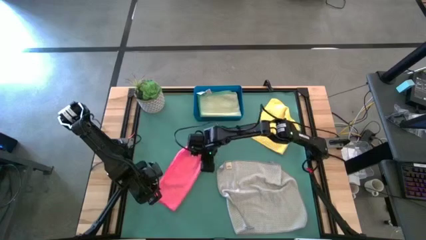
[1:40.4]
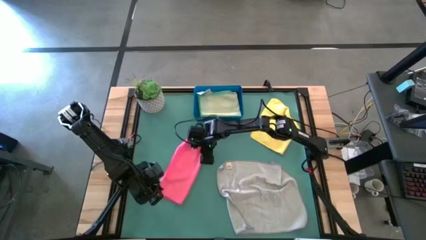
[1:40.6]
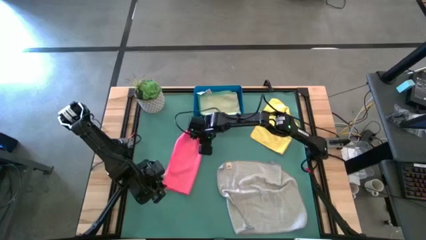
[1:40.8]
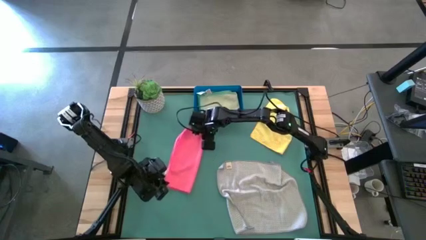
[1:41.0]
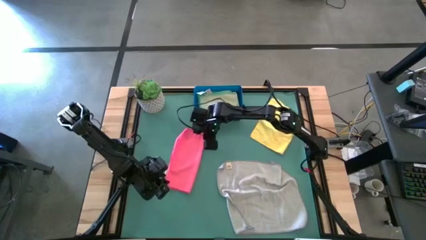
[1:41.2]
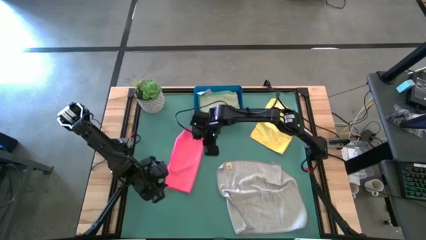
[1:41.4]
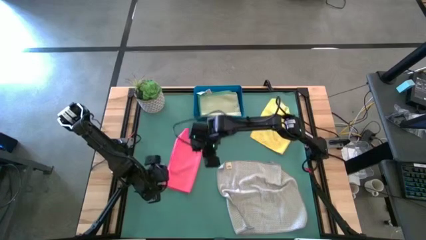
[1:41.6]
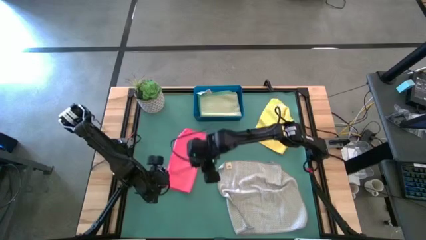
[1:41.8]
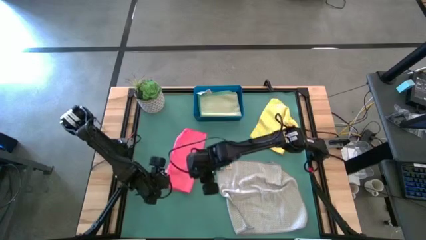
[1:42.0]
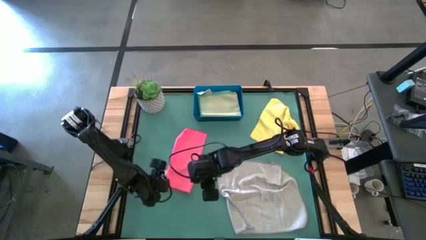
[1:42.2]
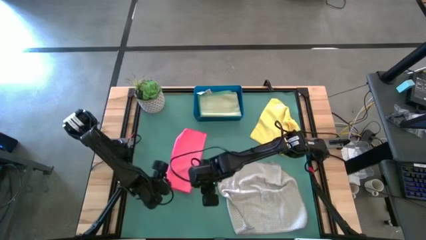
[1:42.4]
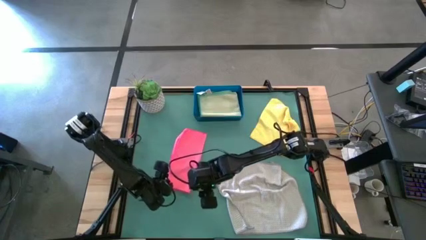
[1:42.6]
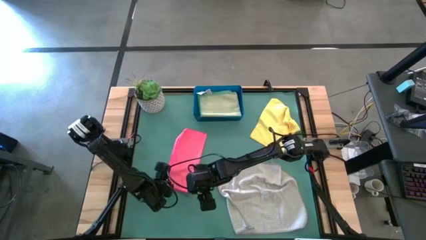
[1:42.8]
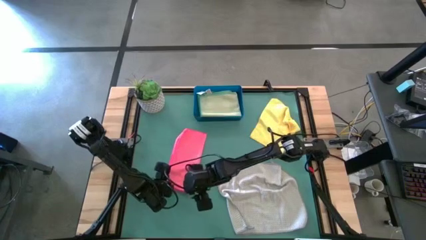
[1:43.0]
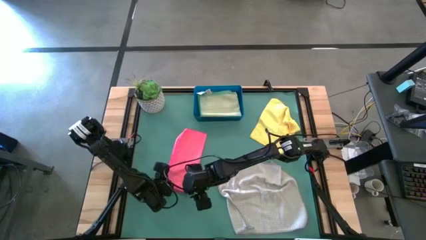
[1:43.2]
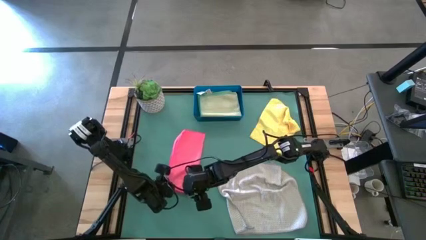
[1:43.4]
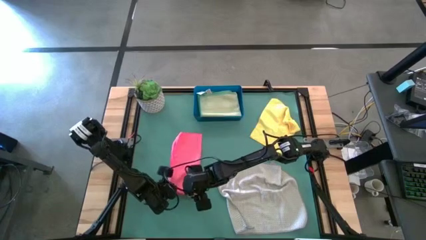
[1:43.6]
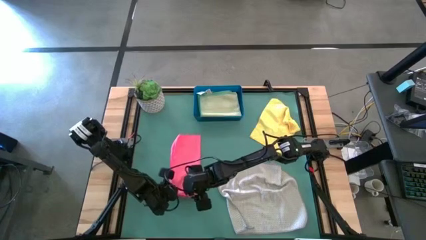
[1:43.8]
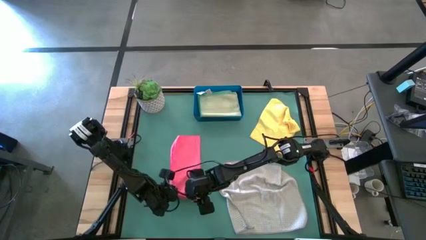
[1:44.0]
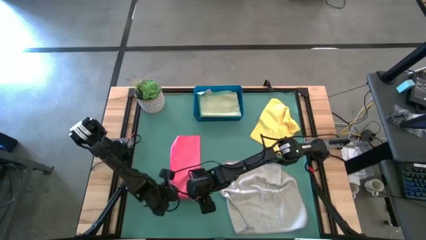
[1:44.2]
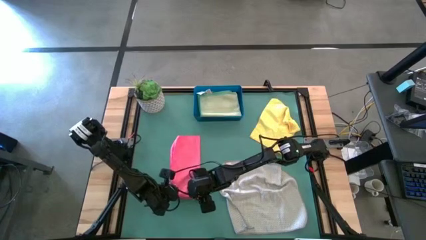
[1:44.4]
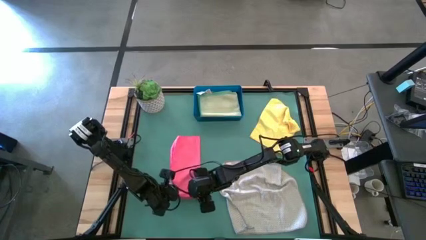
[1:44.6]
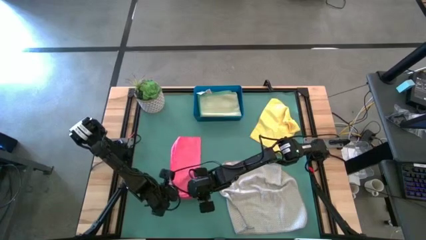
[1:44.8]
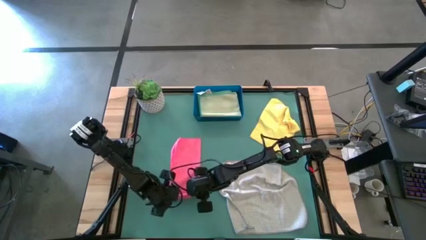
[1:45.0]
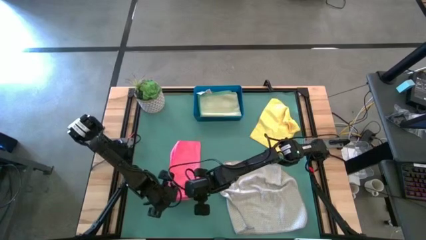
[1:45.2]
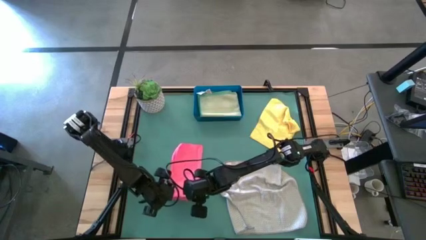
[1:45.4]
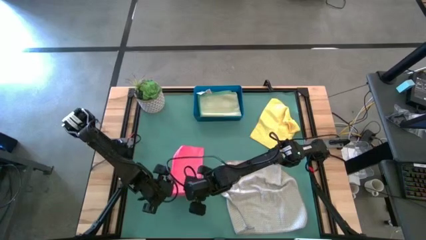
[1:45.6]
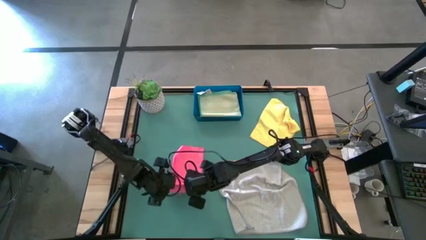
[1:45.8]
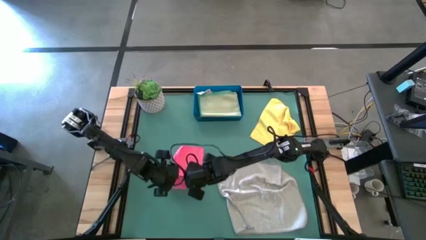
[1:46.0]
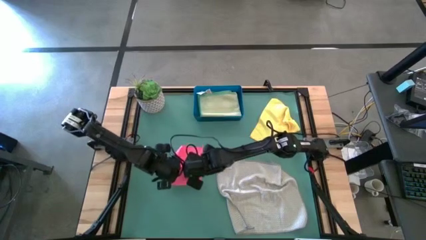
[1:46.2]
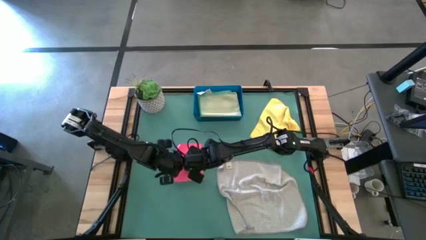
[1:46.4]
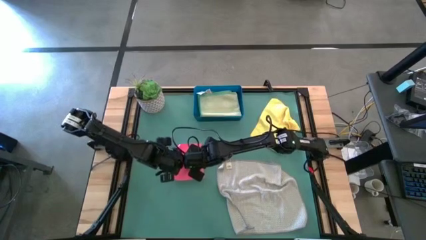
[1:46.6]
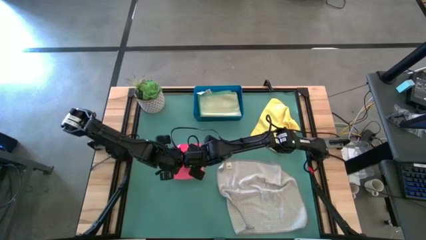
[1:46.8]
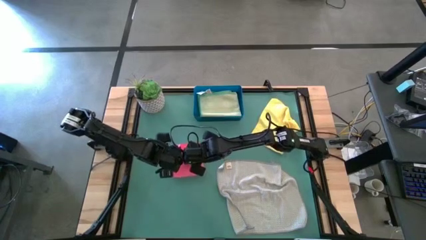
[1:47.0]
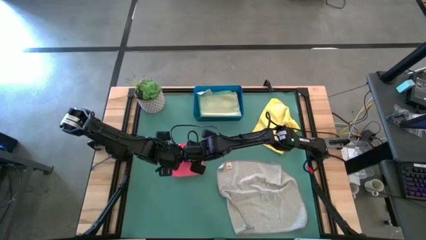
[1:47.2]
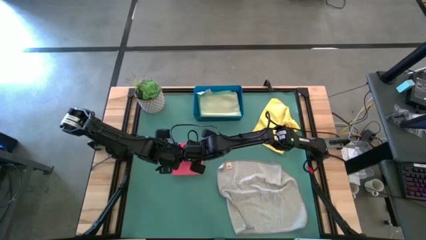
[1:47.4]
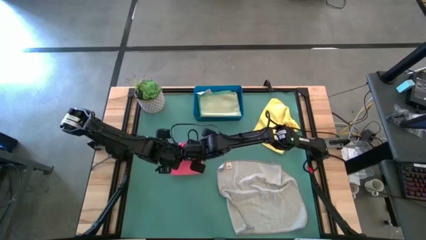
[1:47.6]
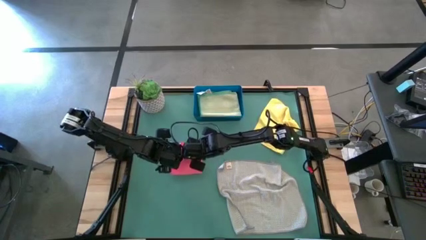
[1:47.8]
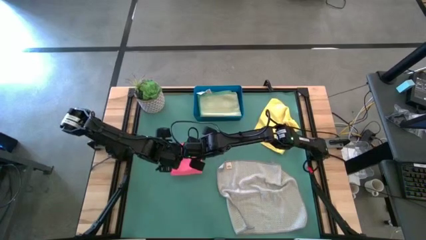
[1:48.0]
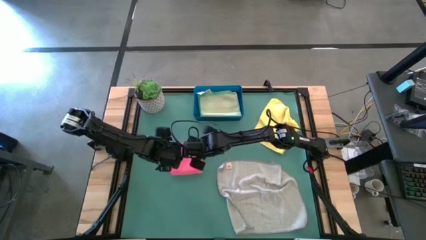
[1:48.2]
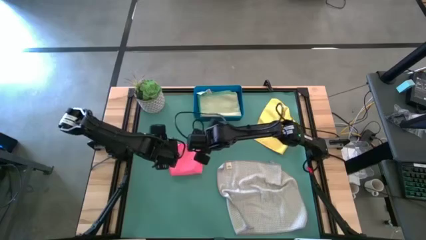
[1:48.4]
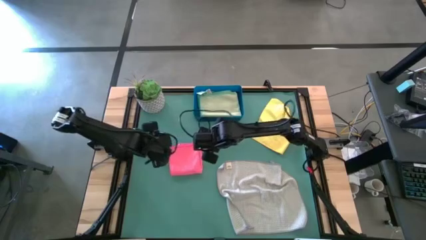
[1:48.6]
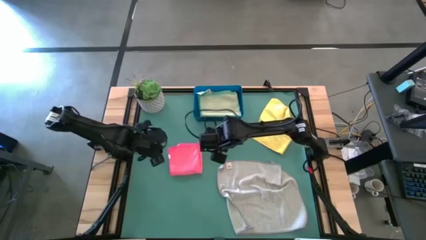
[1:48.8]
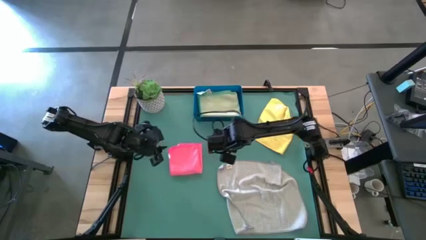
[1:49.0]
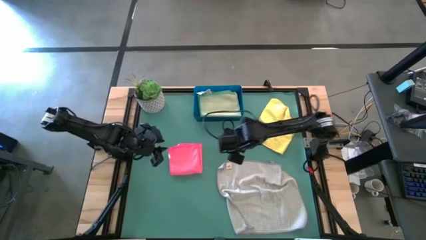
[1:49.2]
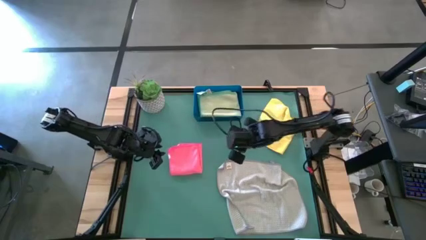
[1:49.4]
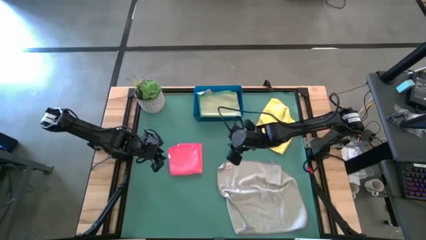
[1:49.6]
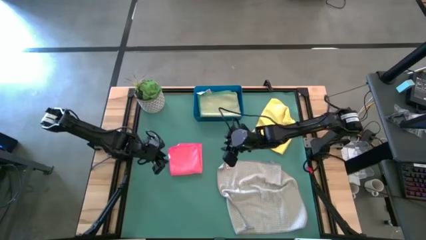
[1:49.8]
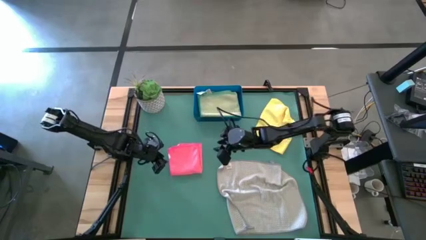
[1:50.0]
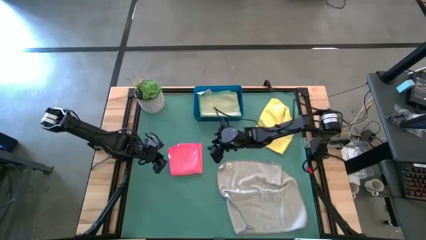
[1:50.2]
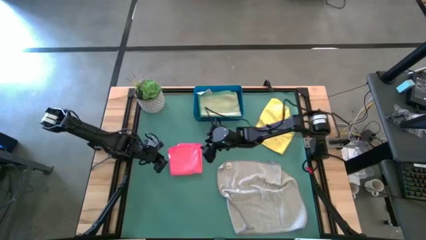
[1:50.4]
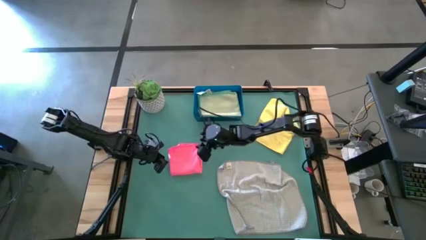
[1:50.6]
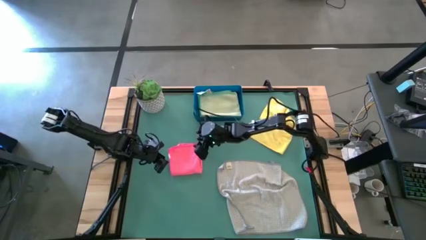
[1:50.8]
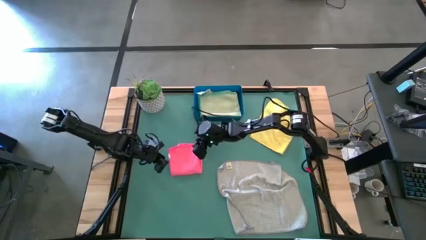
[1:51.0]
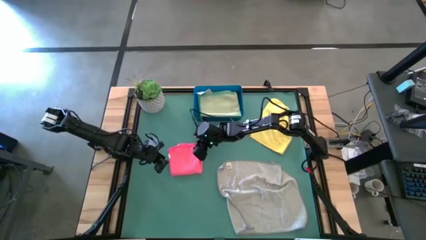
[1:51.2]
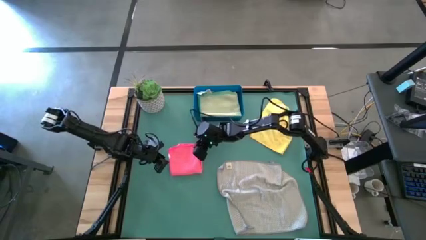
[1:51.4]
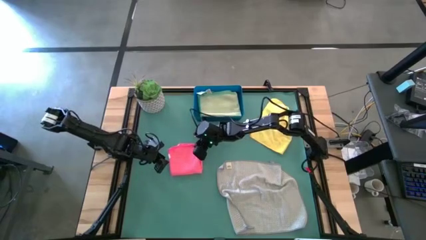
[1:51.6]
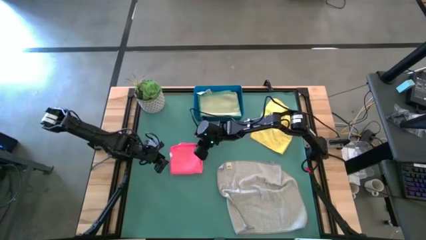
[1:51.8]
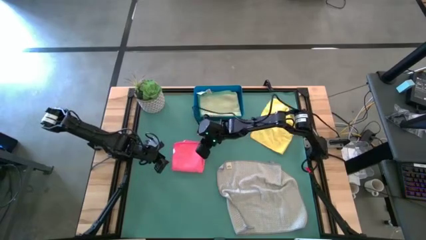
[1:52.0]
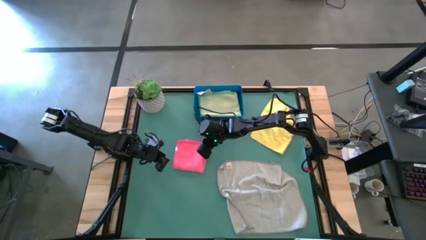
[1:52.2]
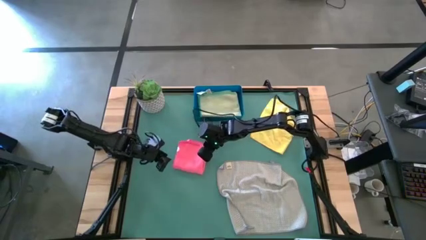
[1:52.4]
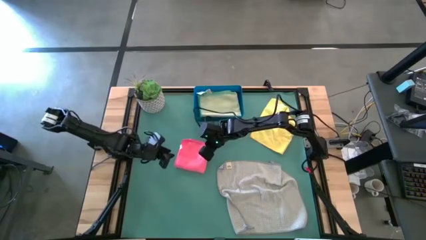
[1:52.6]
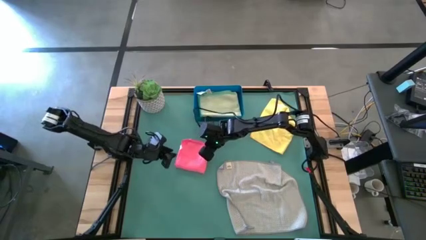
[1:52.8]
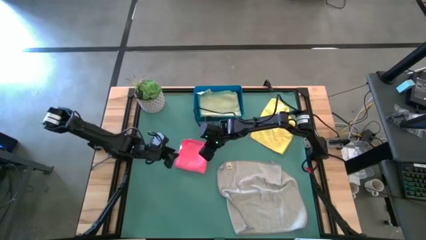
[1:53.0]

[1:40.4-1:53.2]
Task: Fold microfiber towels
Fold the pink microfiber towel

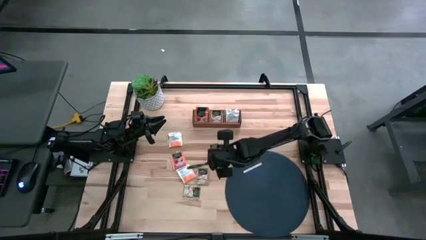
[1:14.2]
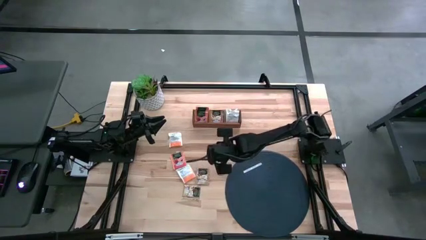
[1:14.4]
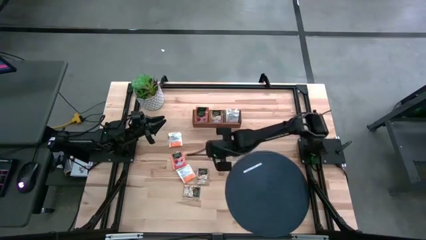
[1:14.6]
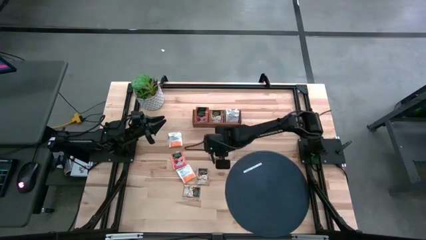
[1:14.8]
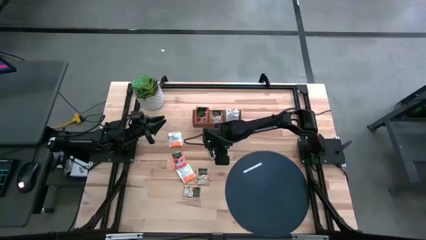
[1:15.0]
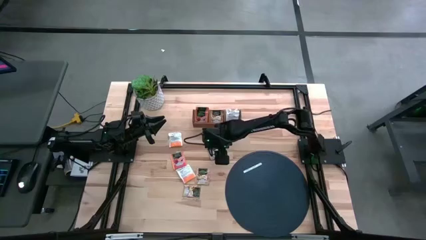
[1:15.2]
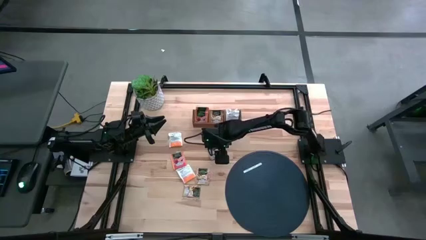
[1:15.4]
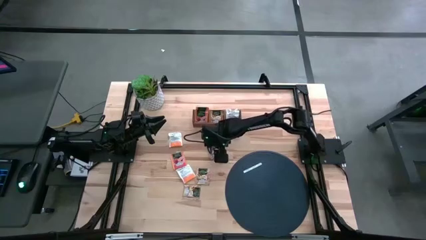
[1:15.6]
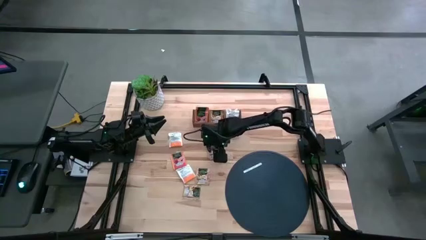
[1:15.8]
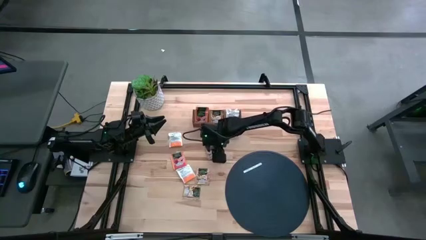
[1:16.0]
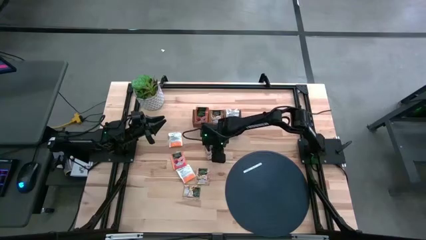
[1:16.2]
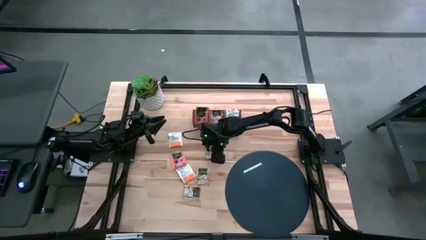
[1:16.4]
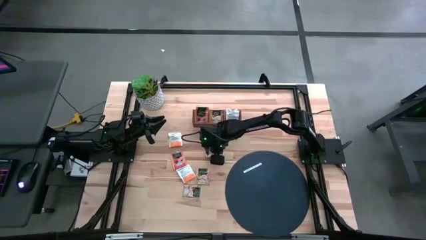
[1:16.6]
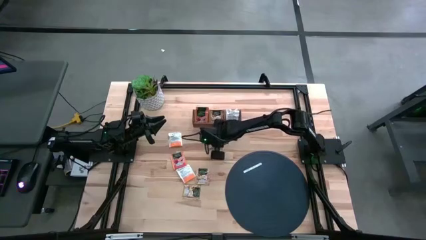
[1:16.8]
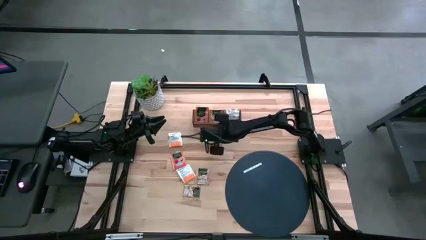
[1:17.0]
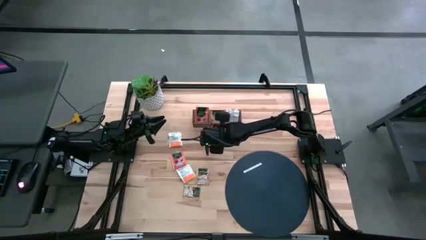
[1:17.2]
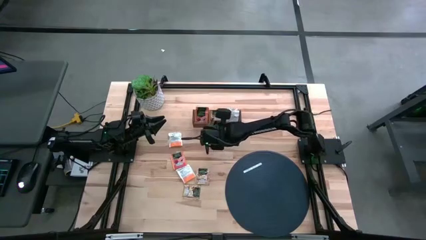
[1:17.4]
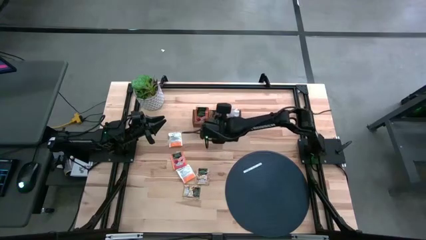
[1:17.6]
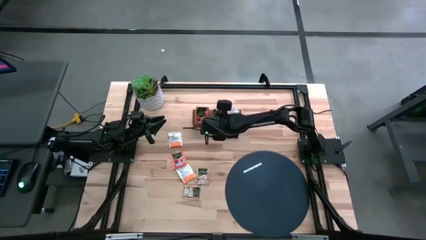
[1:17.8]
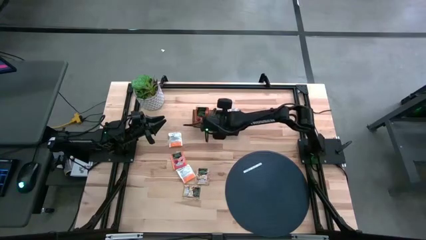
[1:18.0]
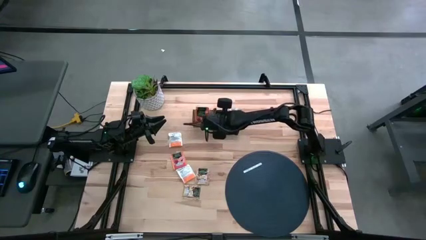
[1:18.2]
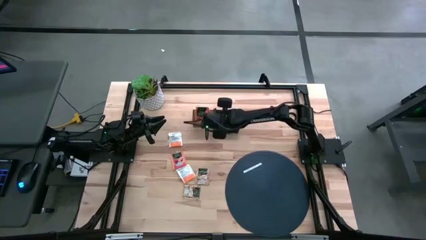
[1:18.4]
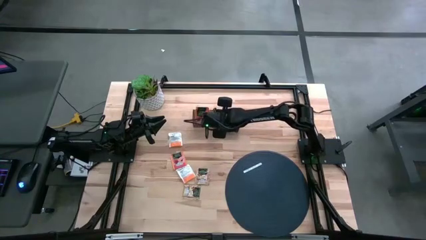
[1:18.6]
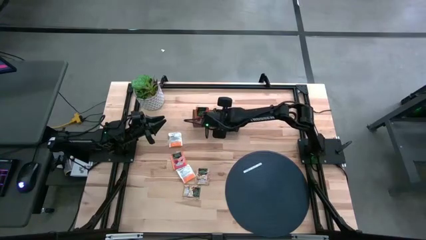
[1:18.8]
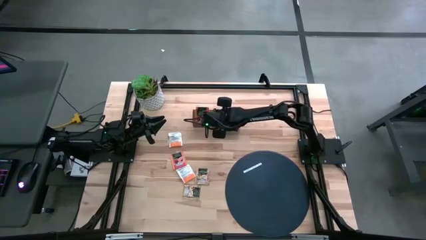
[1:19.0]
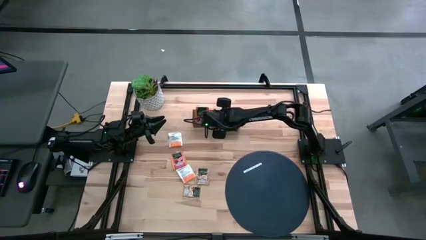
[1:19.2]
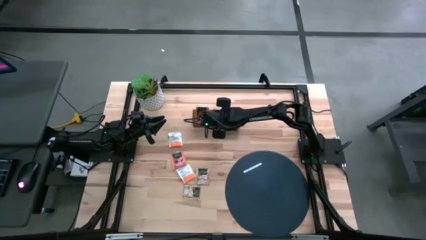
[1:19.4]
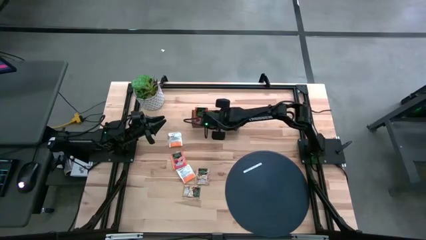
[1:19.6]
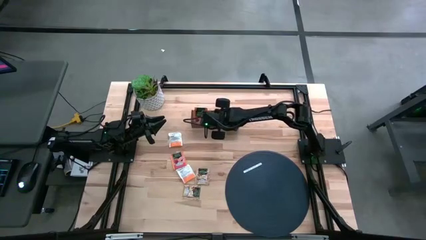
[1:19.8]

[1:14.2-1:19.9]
Task: Pick & Place Tea
Put the brown tea sachet into the middle section of the wooden organizer
